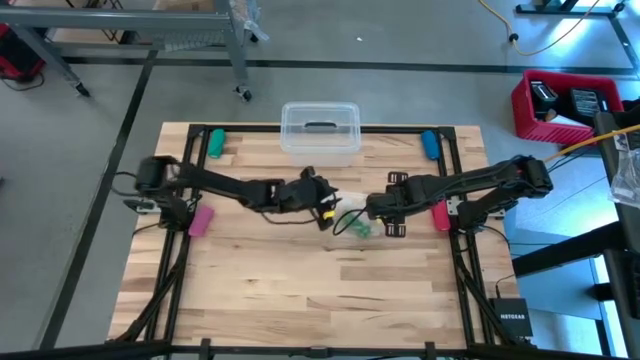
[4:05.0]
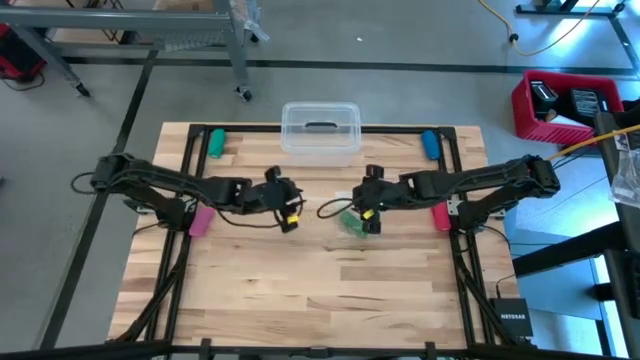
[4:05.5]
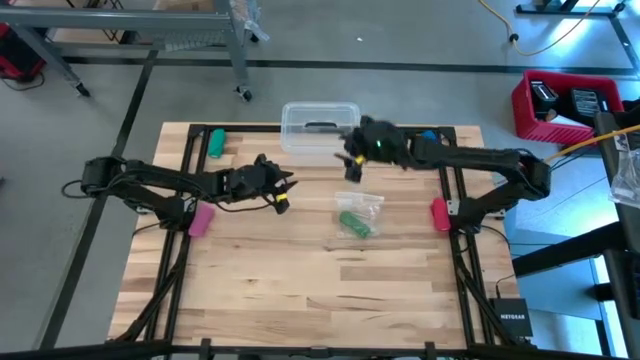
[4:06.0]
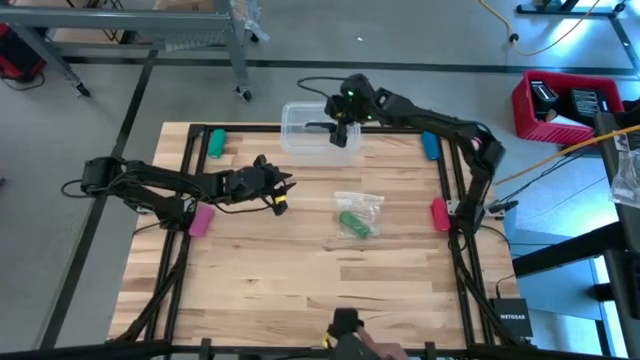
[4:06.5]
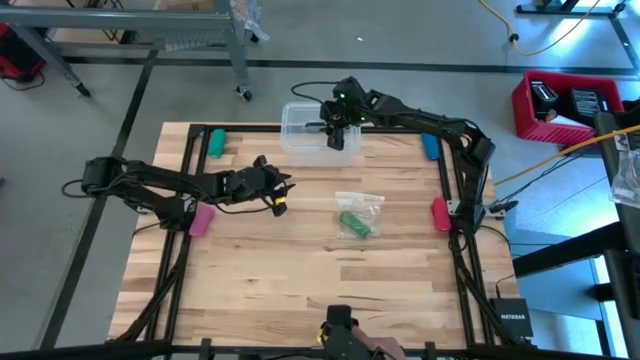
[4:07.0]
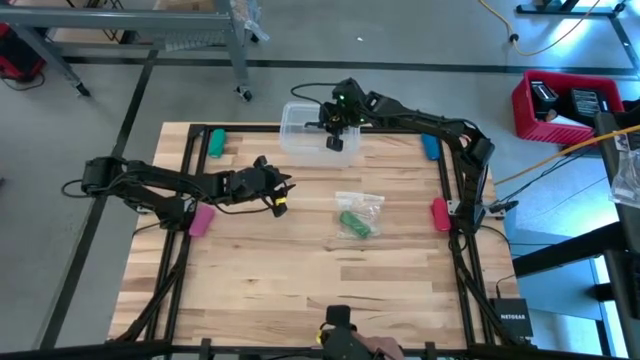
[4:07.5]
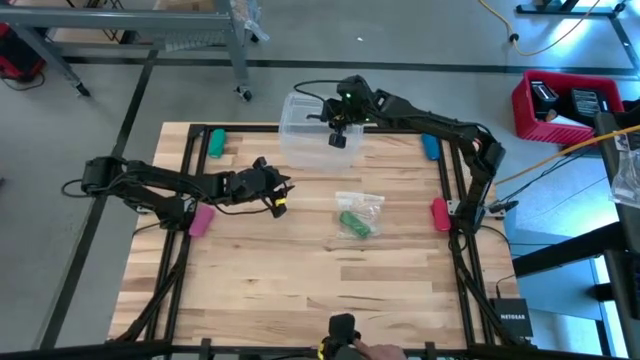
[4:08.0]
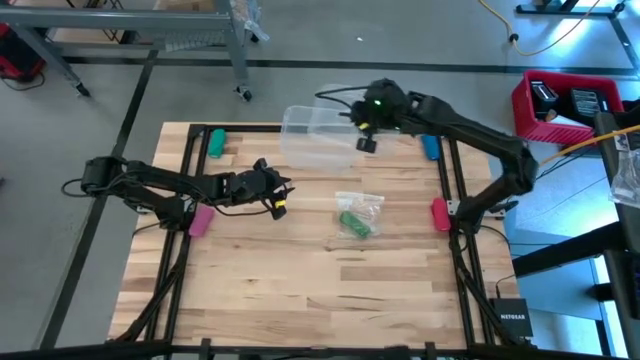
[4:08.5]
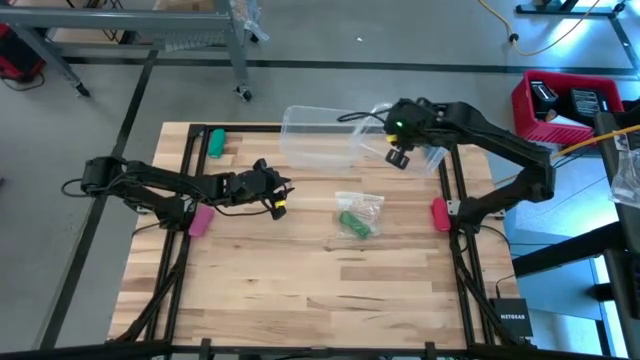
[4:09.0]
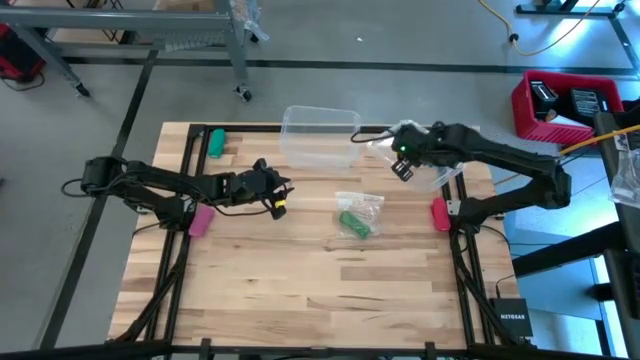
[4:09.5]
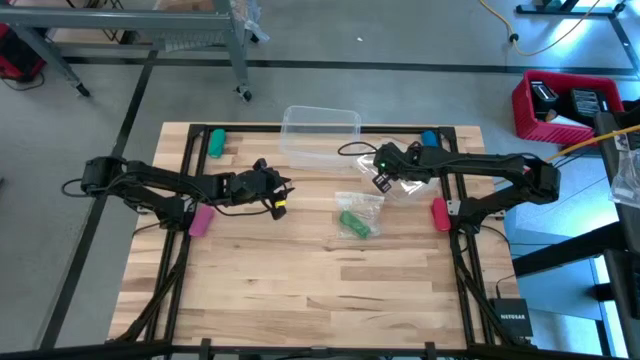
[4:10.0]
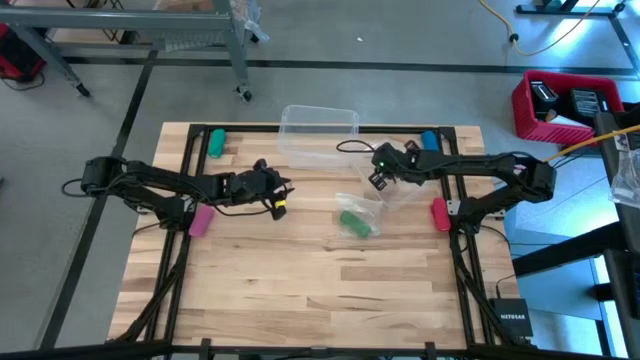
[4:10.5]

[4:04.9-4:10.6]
Task: Roll bandage
Open the transparent bin

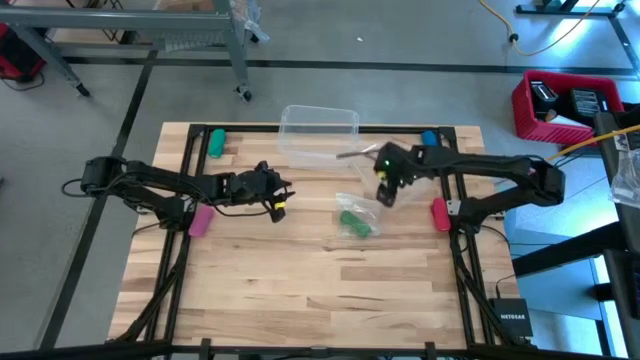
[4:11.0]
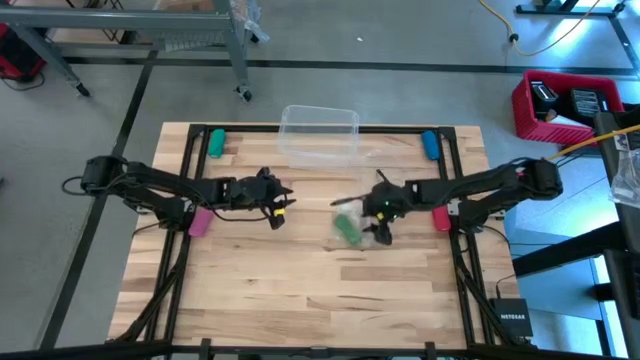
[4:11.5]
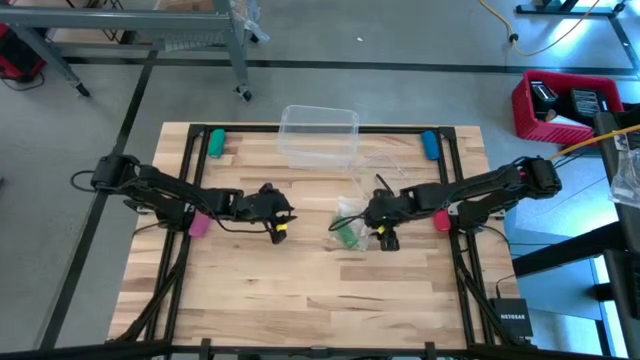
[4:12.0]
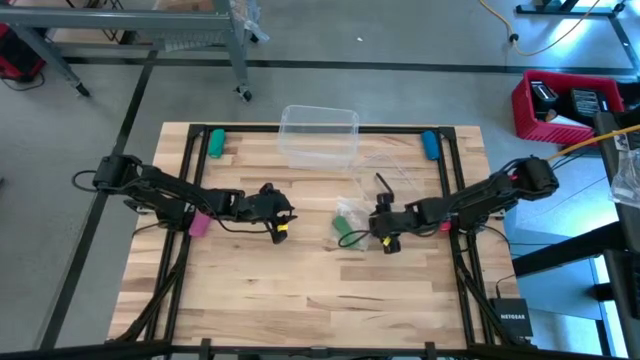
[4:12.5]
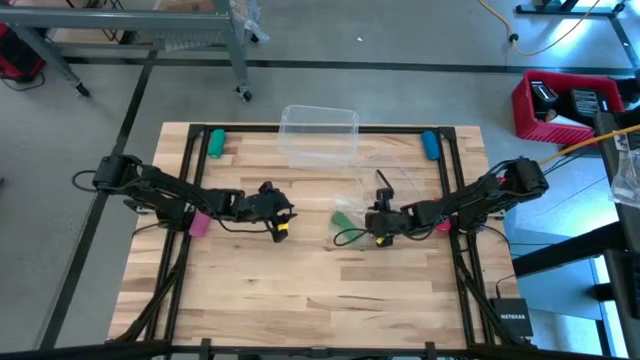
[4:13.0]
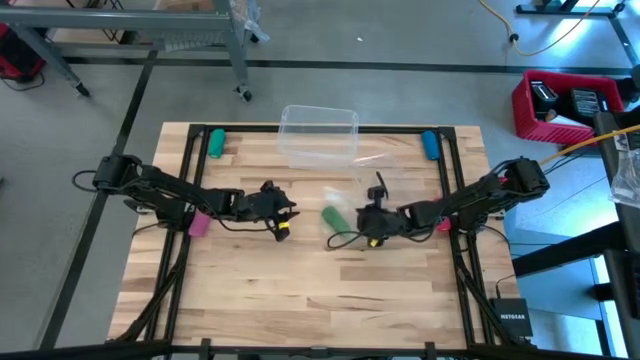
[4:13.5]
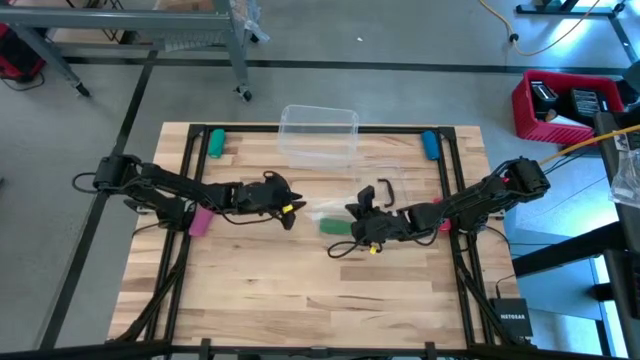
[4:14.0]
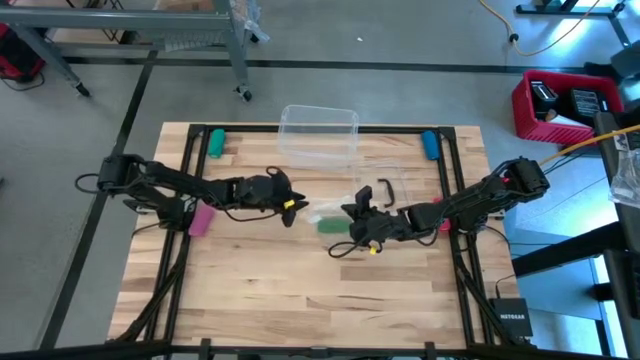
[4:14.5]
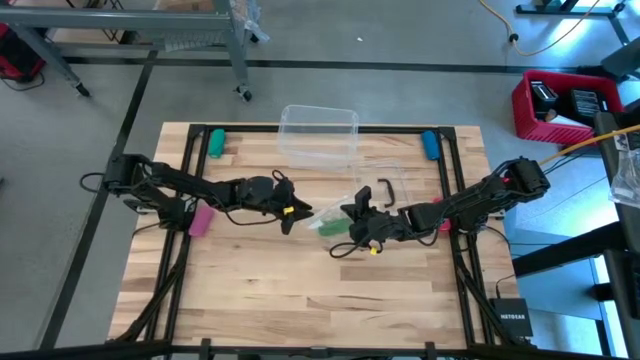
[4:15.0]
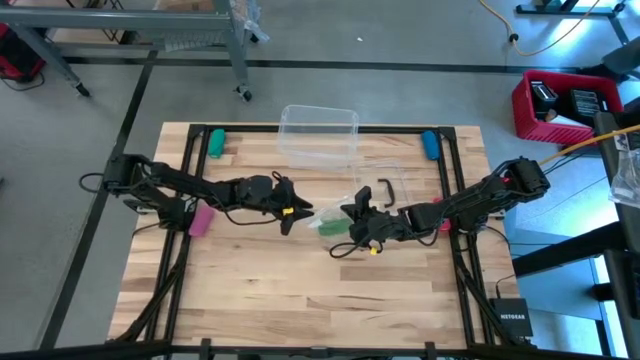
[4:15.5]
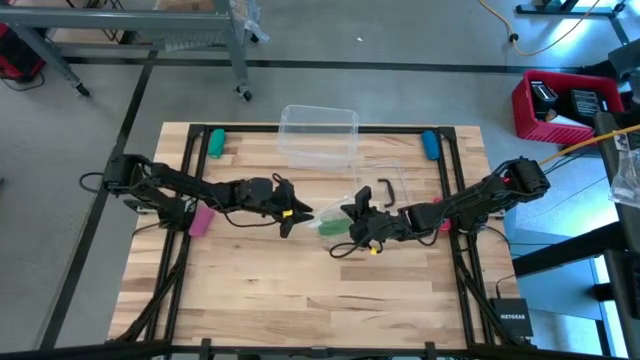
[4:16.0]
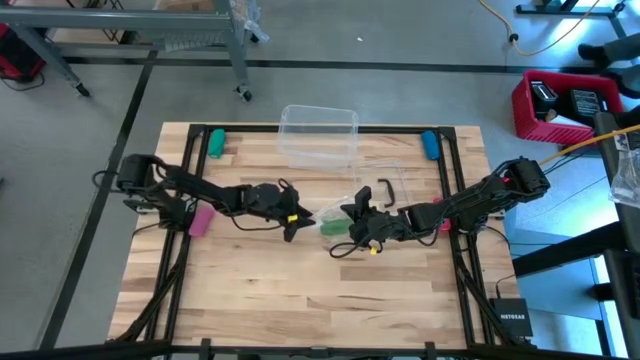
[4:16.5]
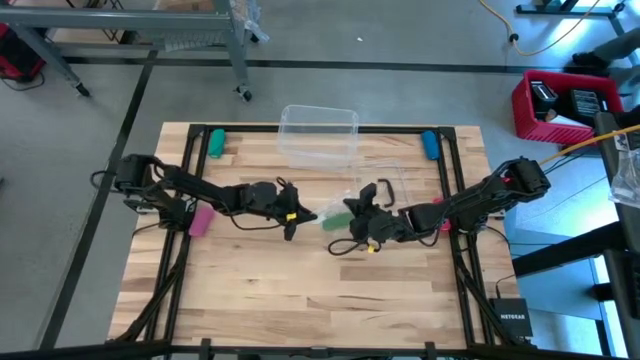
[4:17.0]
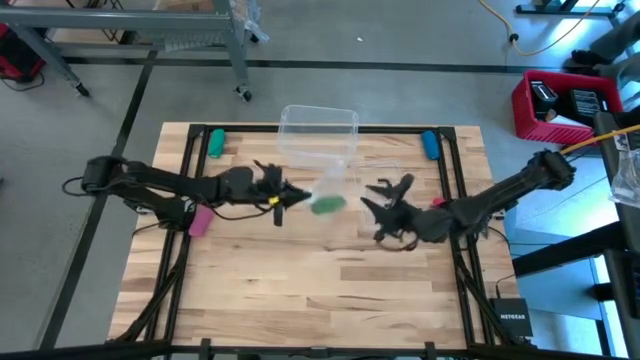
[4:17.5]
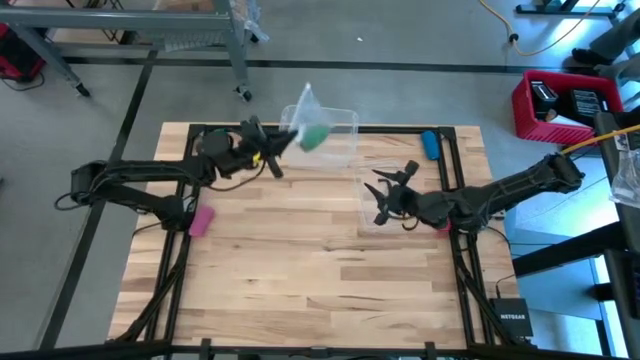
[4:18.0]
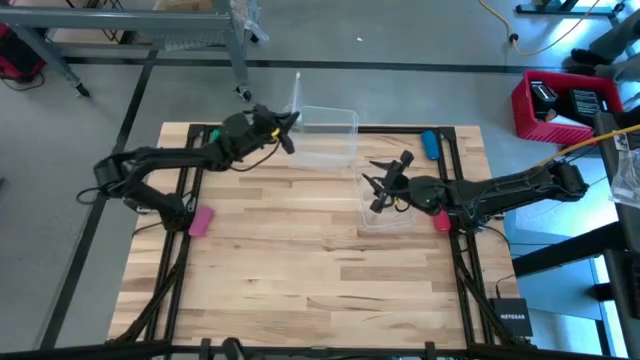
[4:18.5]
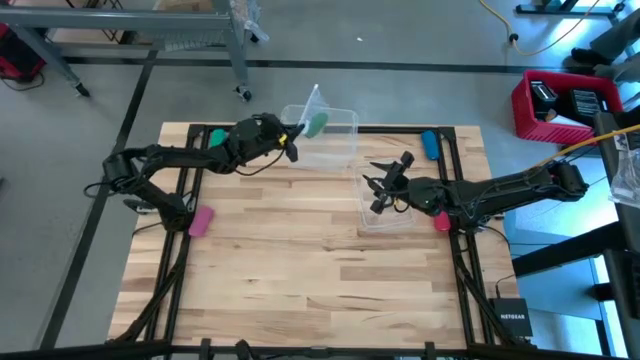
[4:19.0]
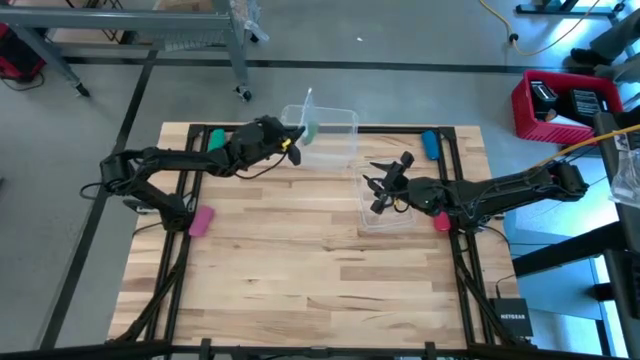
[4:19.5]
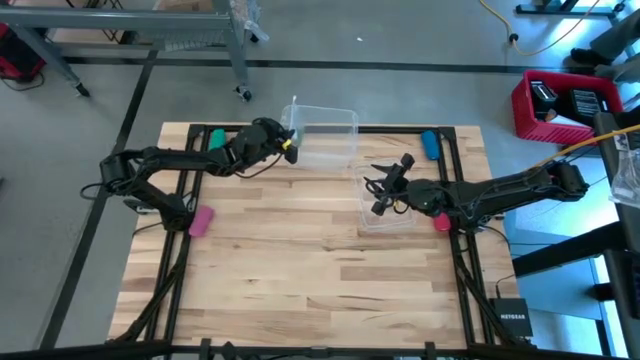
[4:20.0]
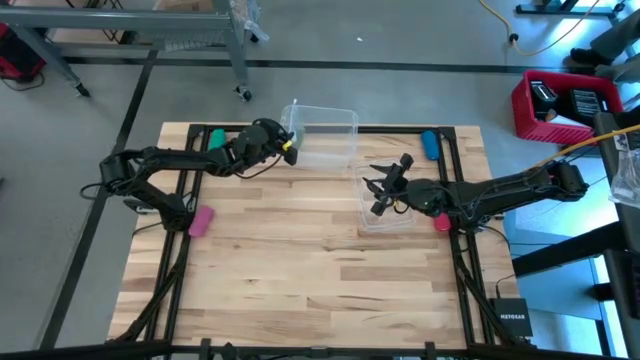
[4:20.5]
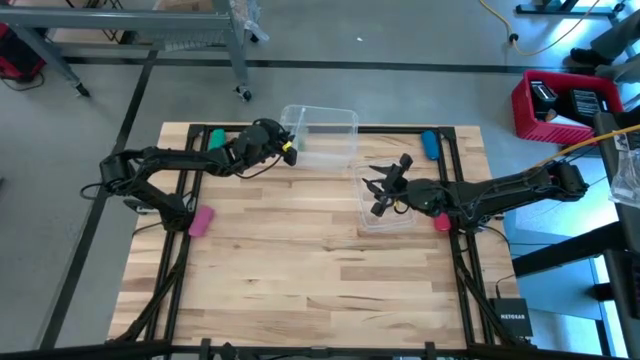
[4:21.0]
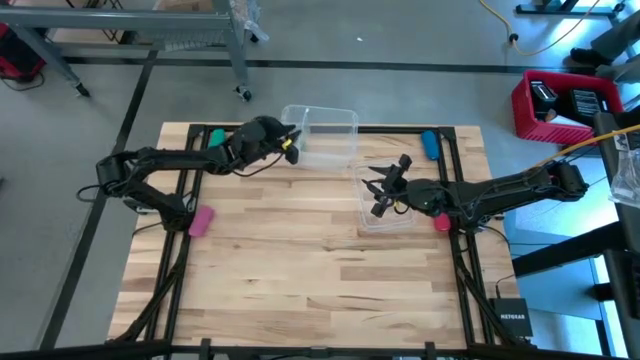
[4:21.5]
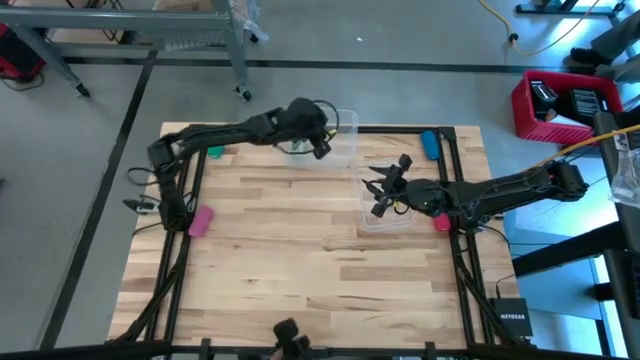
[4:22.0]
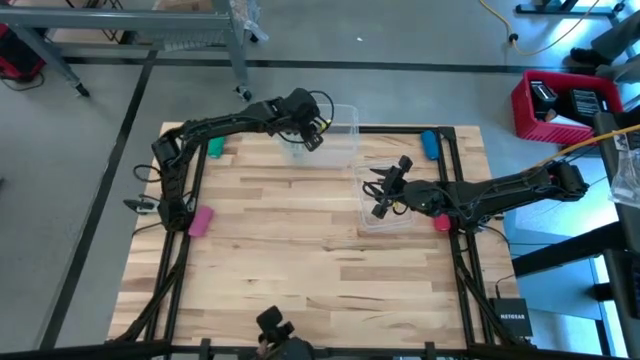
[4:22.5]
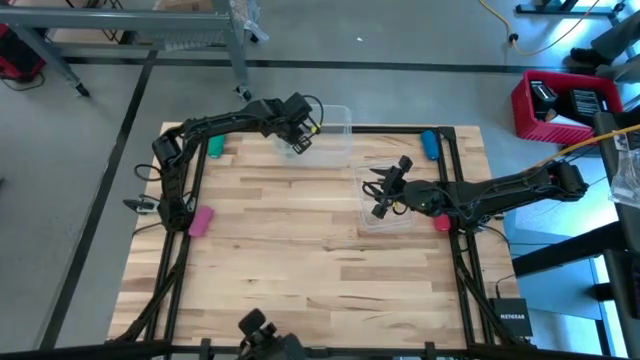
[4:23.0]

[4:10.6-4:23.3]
Put the packed rolled green bandage into the transparent bin

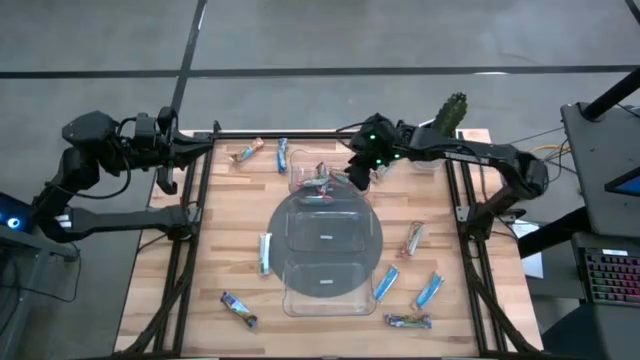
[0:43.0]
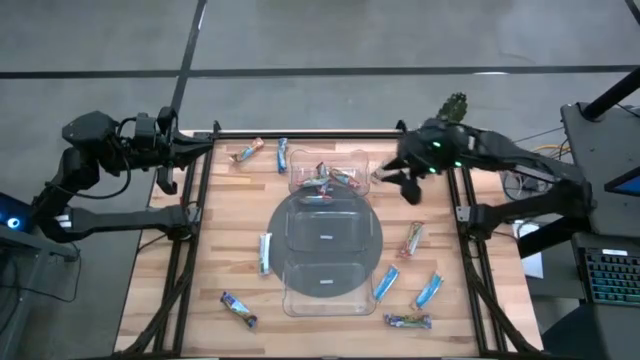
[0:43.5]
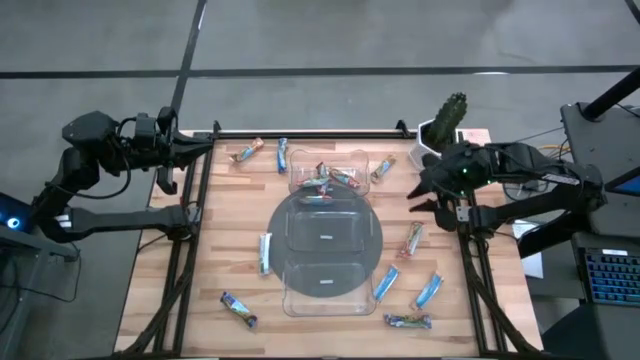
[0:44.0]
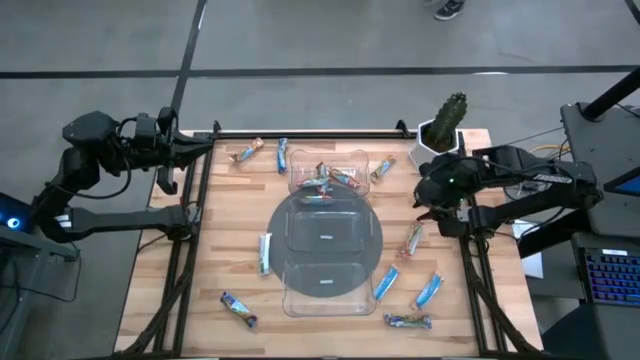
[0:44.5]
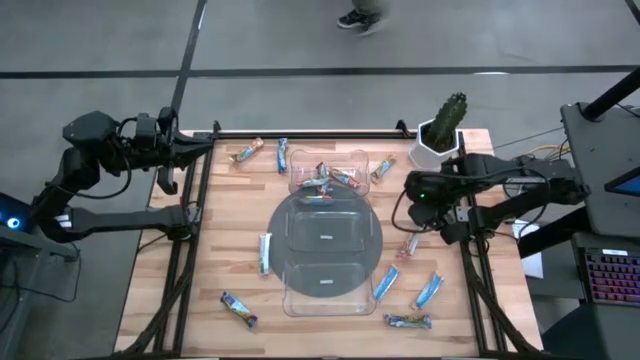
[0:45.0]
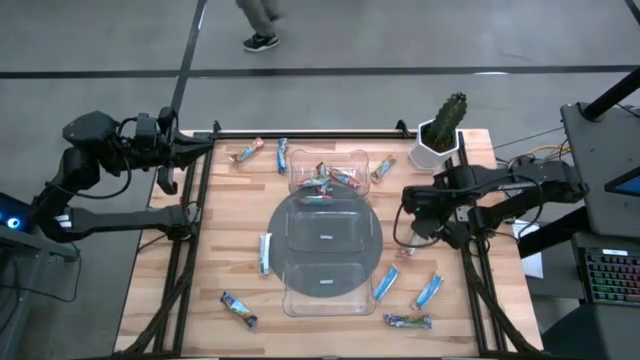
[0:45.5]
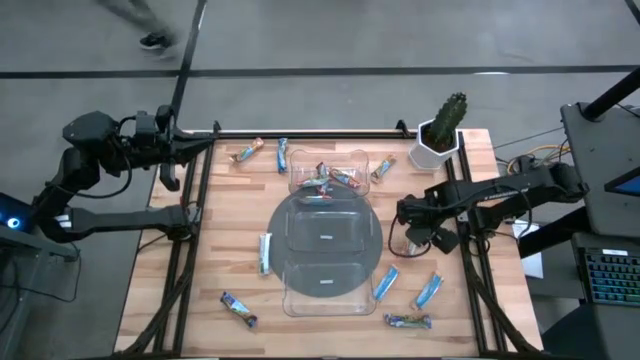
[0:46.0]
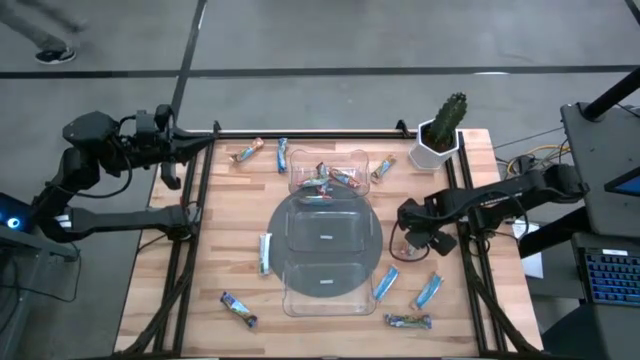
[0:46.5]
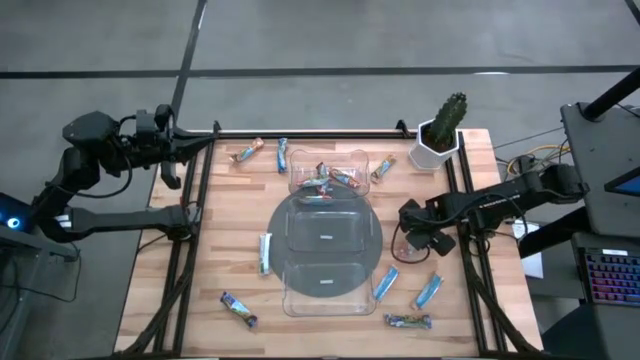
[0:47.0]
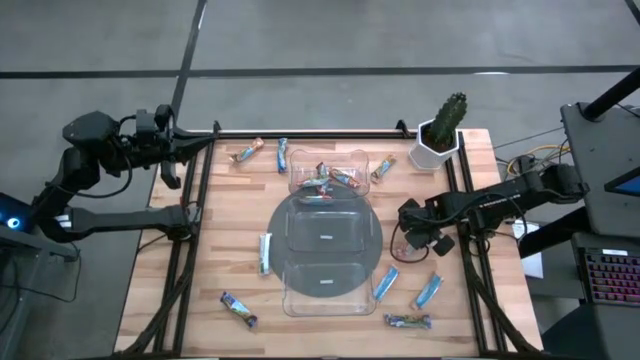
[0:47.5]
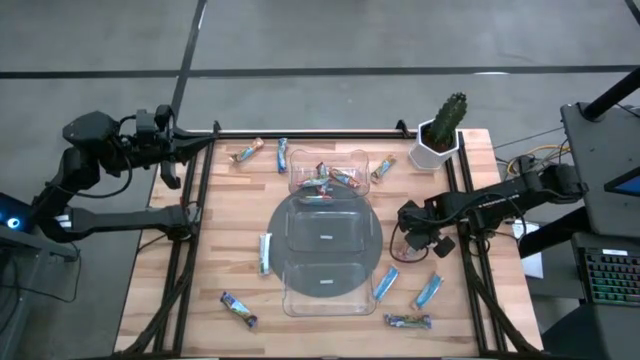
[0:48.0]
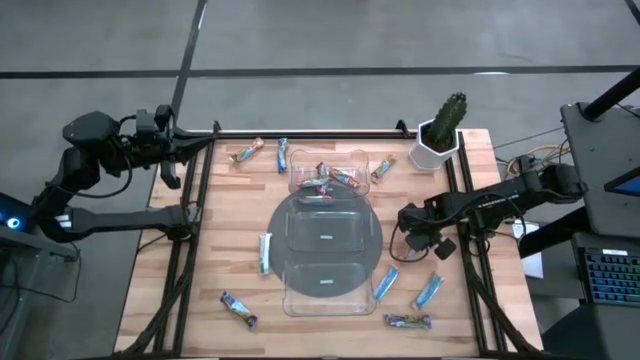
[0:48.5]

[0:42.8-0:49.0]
Task: Pick and place Granola Bars by type
Put the red granola bar into the top transparent bin
